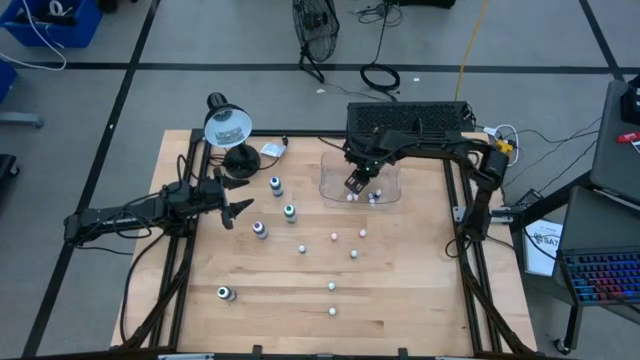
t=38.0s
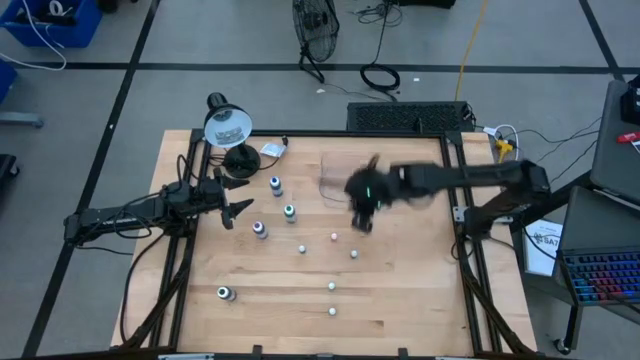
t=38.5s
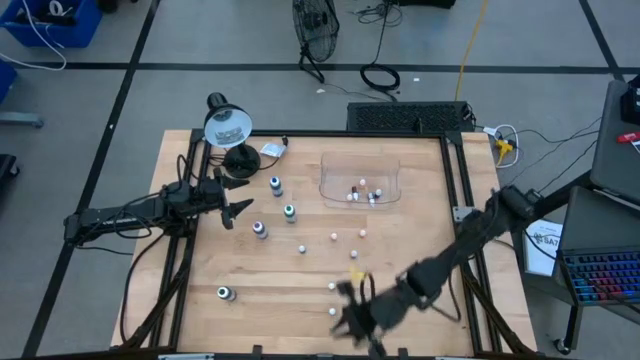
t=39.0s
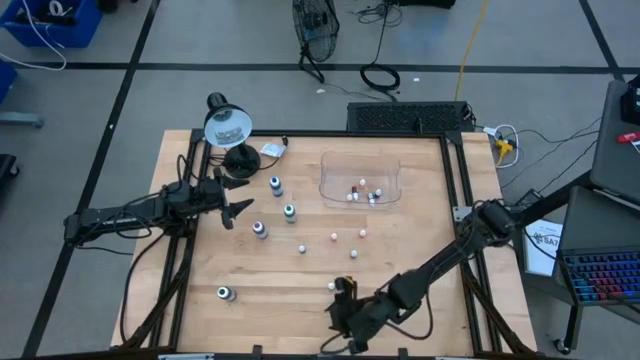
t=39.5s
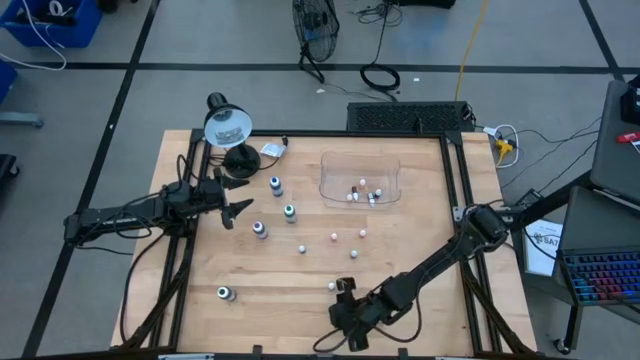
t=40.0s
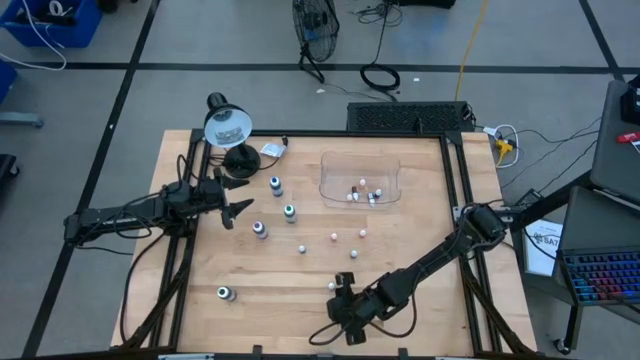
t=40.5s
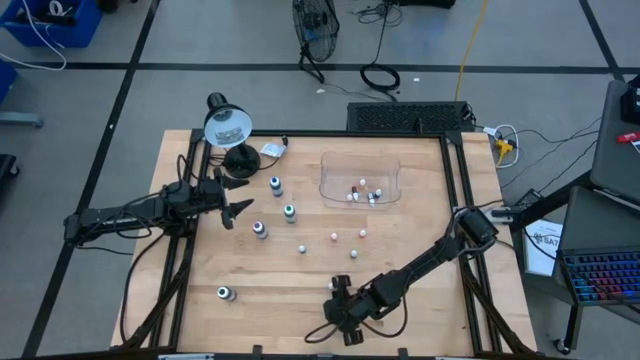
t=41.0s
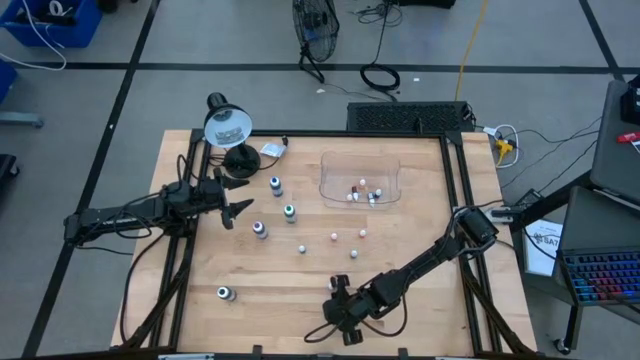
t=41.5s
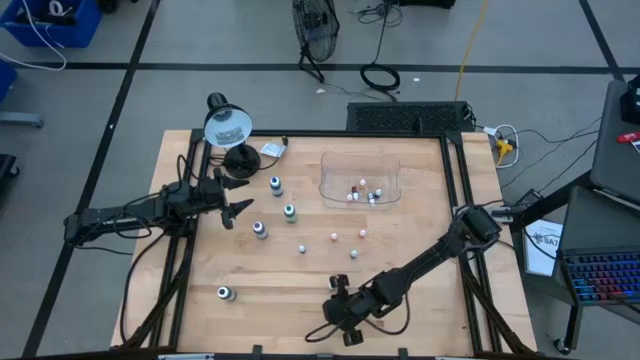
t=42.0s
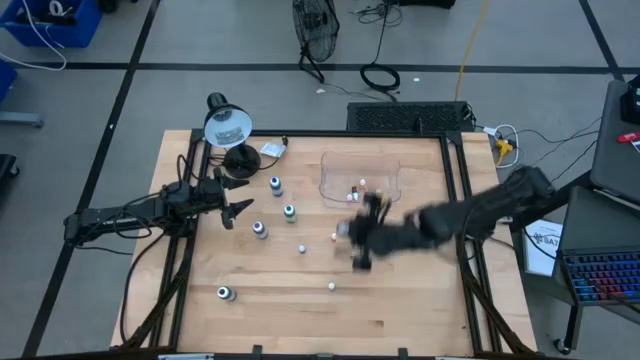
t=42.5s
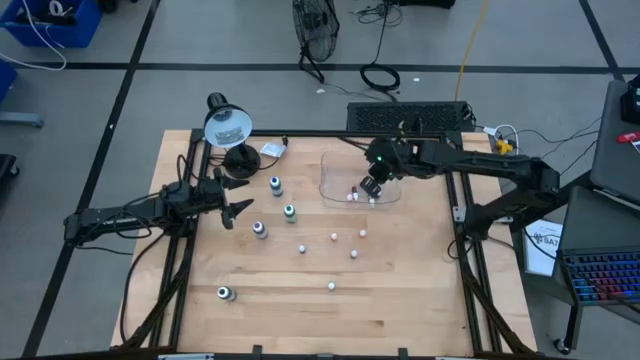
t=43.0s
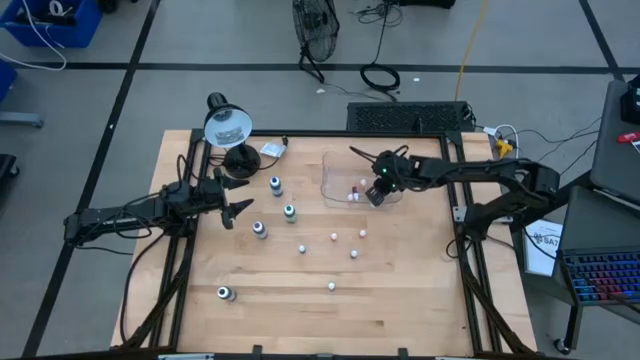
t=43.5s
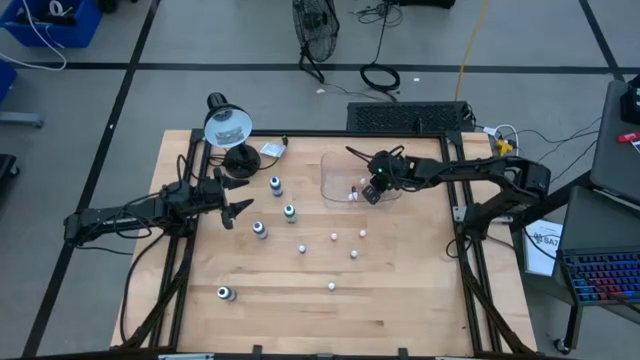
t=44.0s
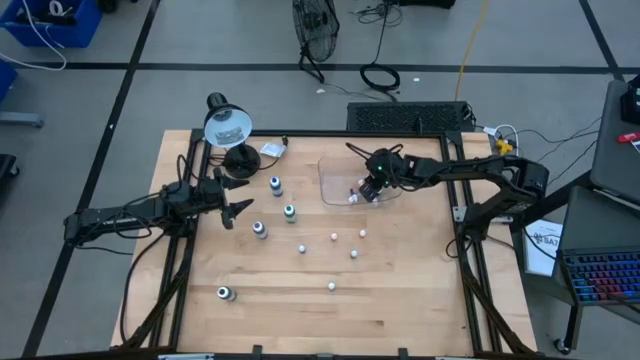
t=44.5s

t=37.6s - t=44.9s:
Task: Pick & Place food coloring
Put the purple food coloring into the transparent bin

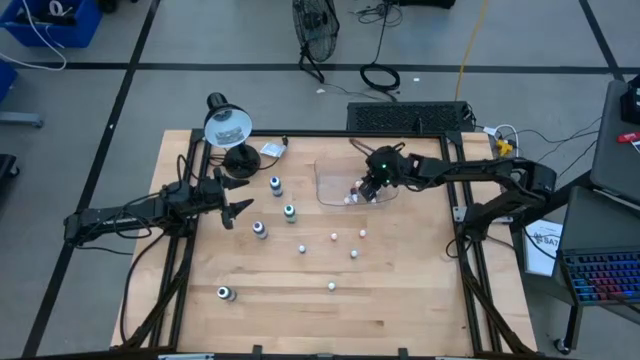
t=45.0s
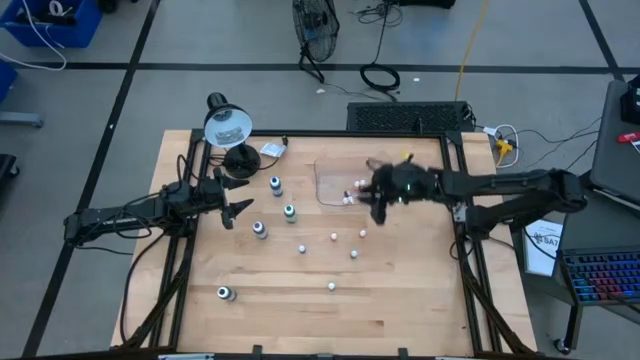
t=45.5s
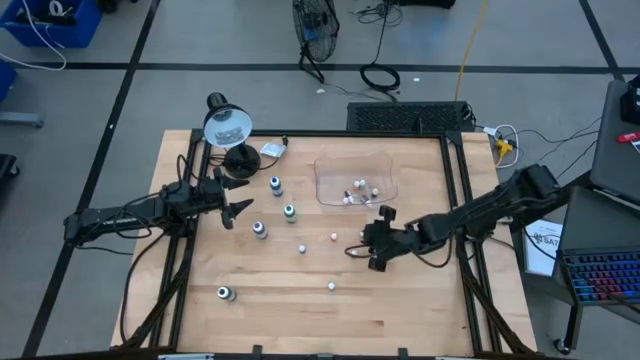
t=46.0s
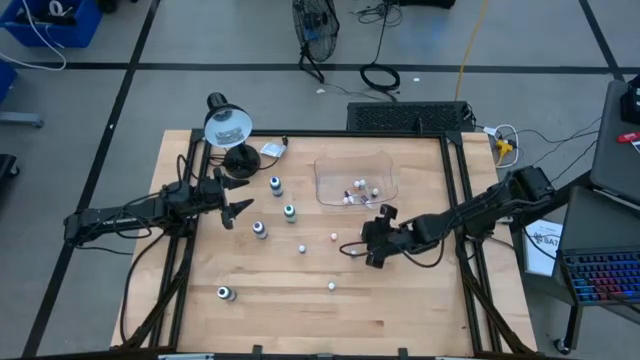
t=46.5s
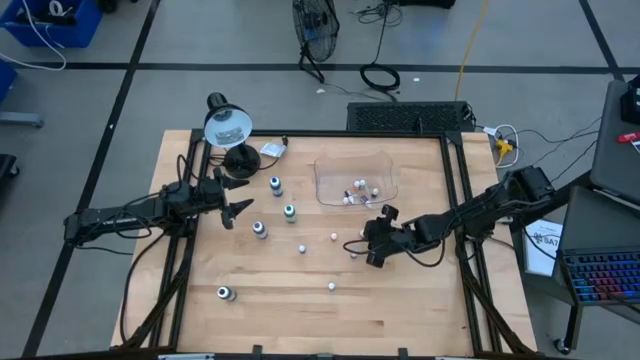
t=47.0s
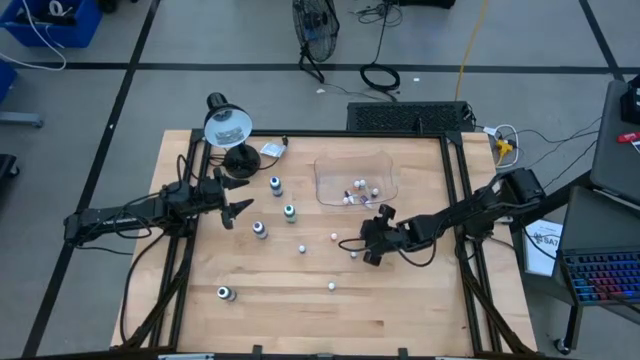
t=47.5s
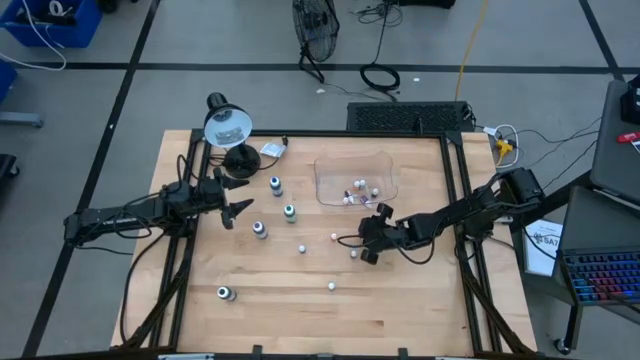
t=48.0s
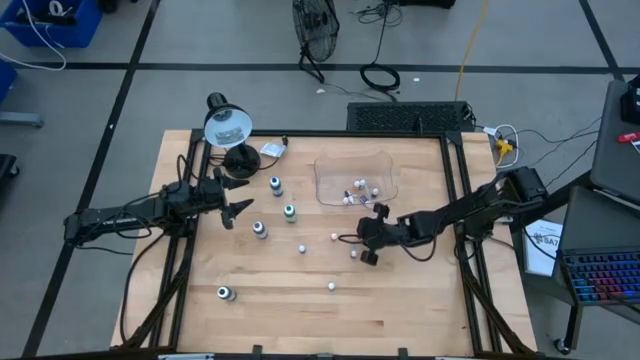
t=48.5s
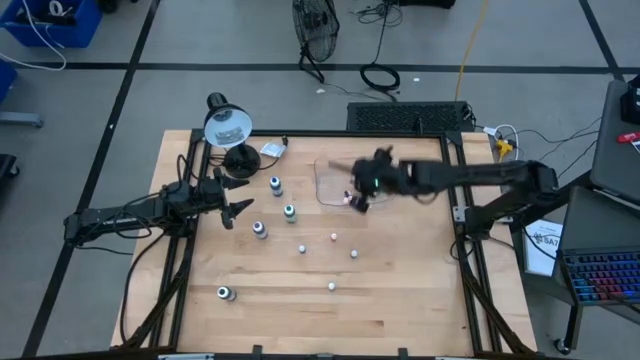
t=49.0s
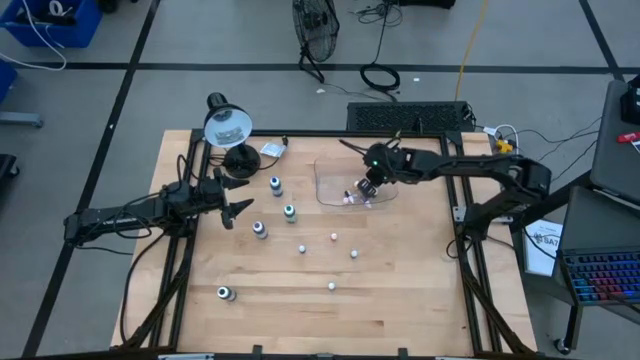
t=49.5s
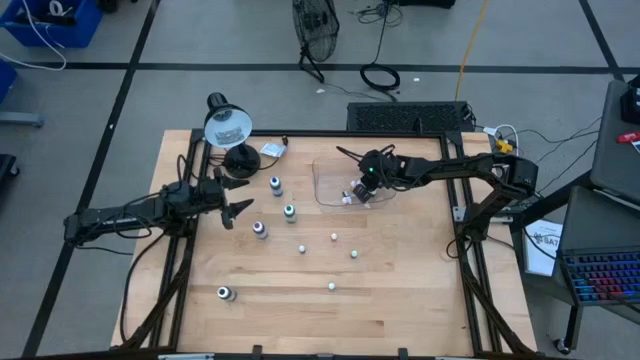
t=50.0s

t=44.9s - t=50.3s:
Put the orange food coloring into the transparent bin

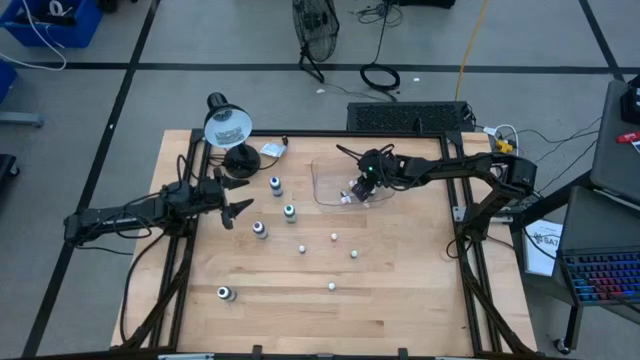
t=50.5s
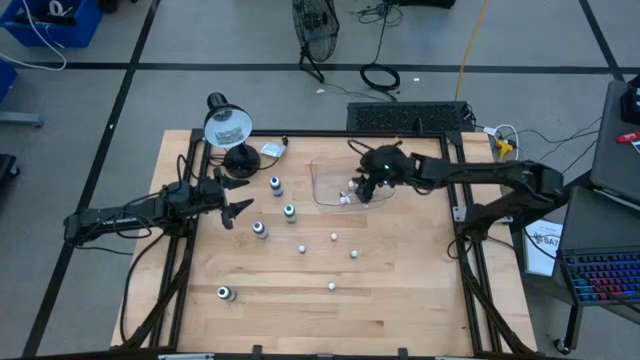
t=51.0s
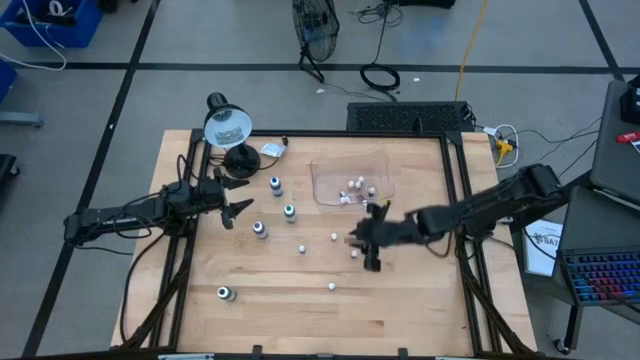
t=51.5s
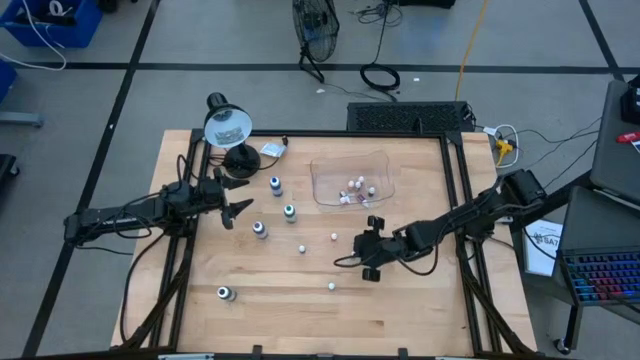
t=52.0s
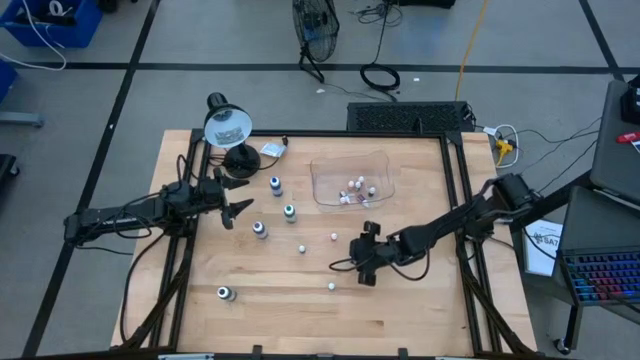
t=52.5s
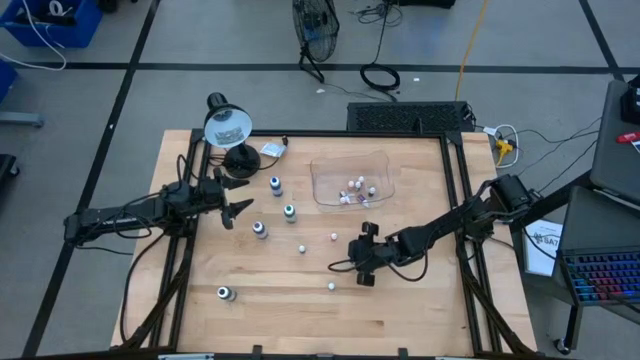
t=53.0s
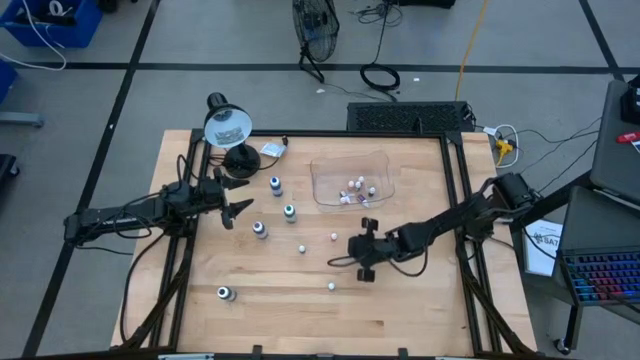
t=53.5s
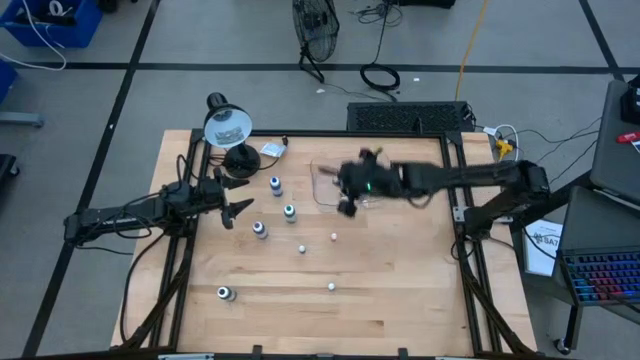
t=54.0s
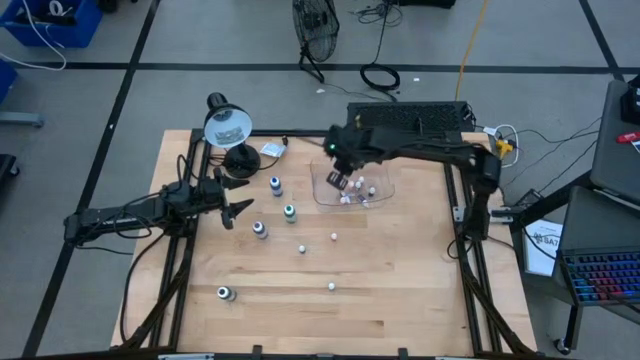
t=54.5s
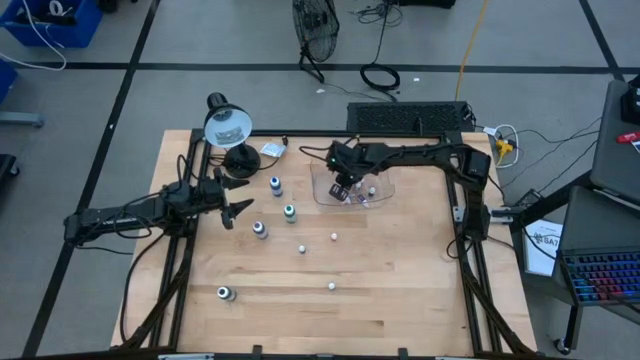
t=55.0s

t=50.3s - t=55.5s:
Put the blue food coloring into the transparent bin

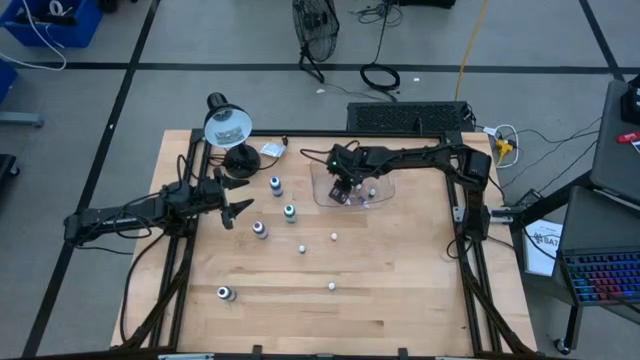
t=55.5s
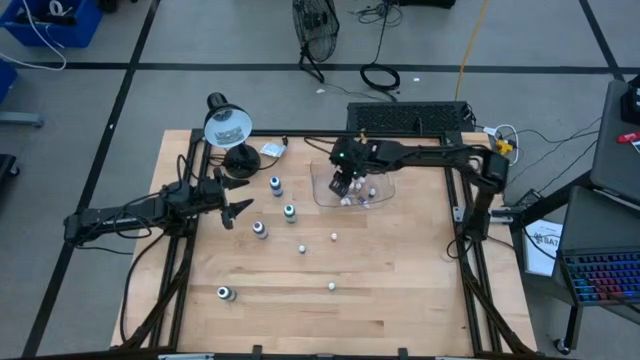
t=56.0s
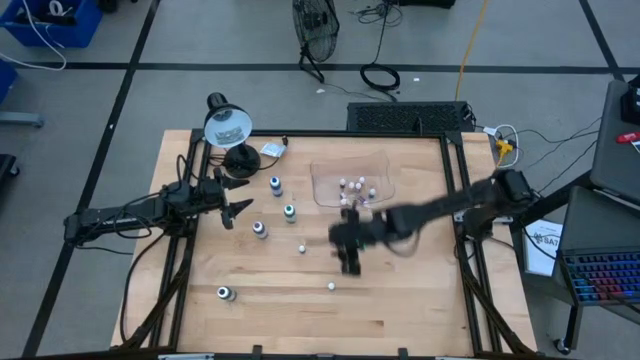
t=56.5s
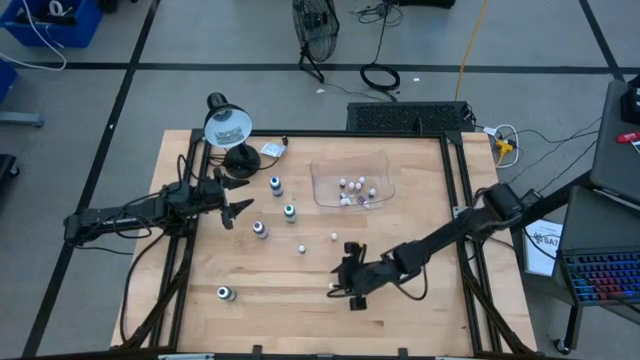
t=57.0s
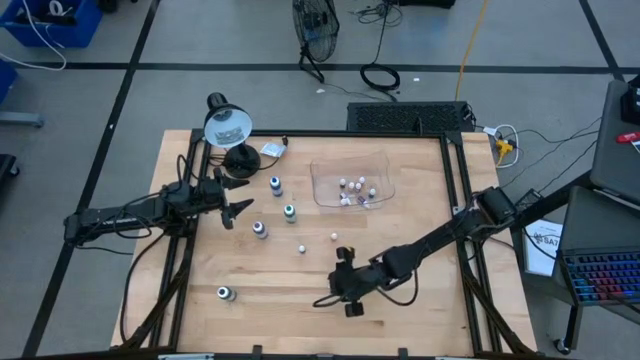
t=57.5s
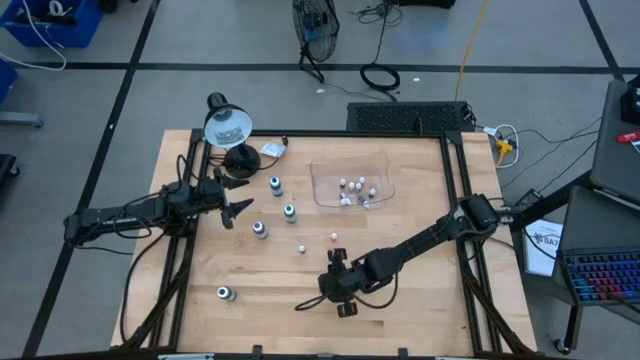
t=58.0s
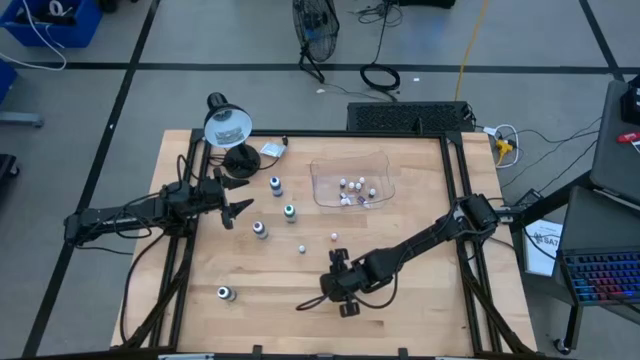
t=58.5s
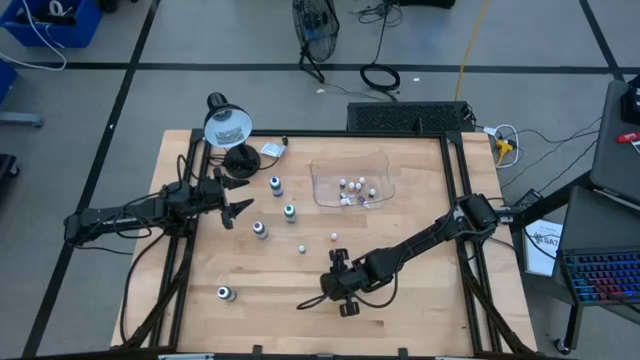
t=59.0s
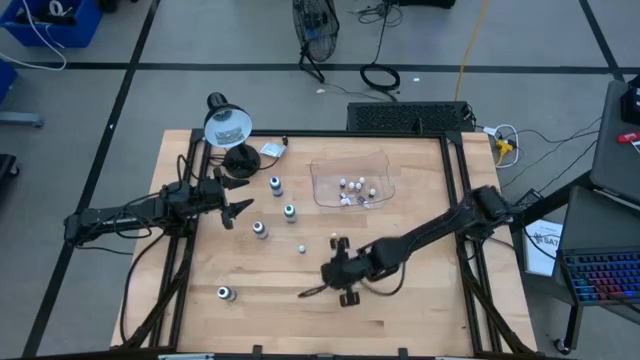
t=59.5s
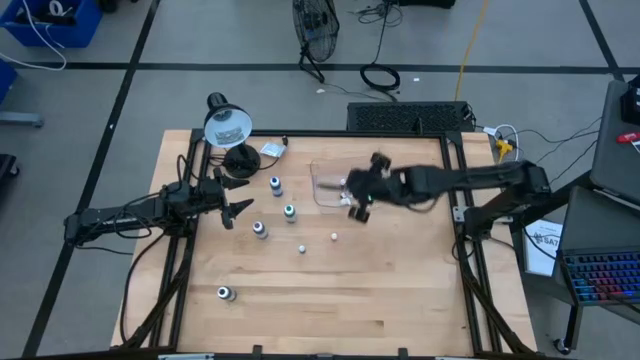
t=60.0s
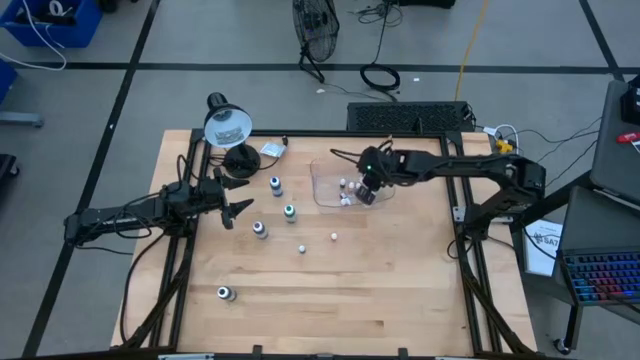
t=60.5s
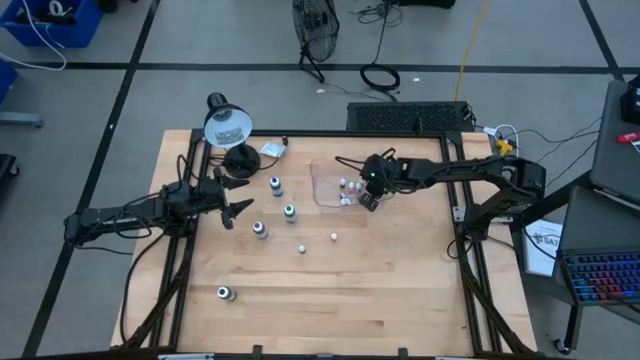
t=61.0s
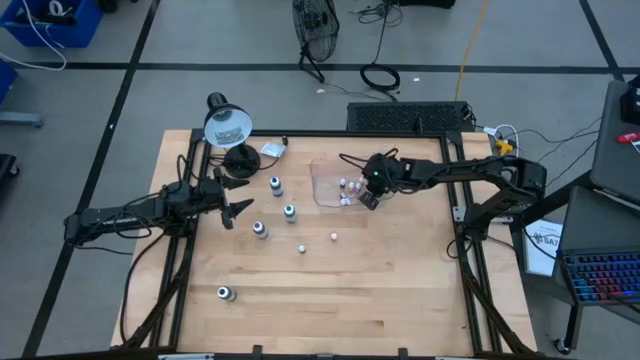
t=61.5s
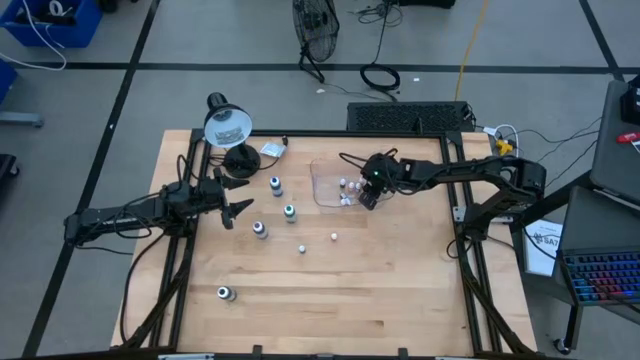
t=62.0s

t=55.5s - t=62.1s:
Put the black food coloring into the transparent bin
